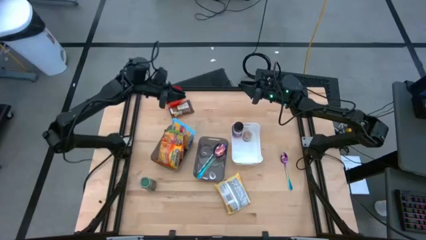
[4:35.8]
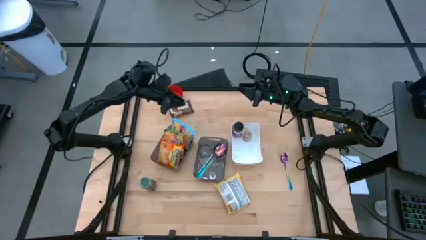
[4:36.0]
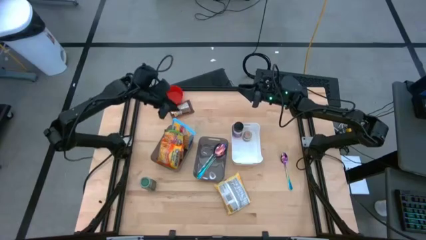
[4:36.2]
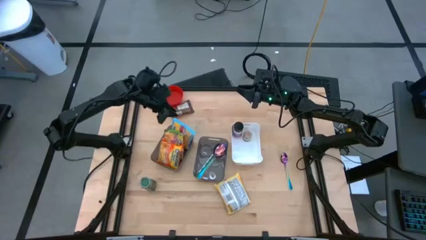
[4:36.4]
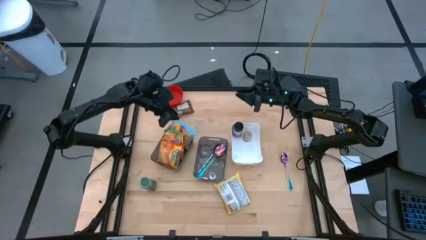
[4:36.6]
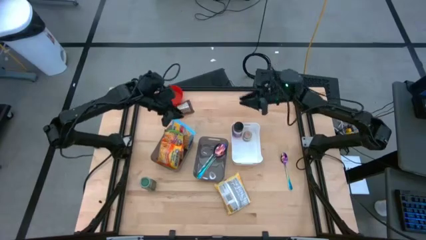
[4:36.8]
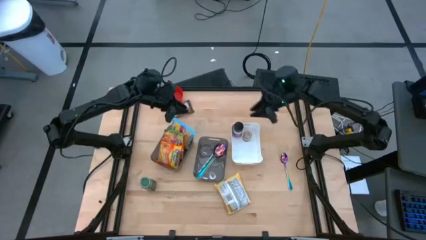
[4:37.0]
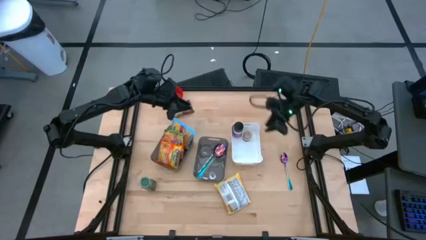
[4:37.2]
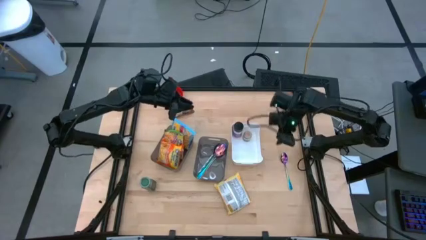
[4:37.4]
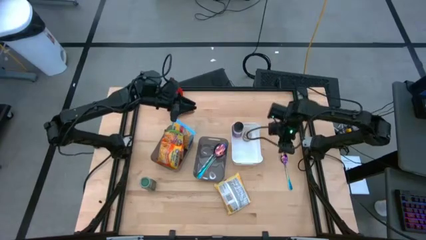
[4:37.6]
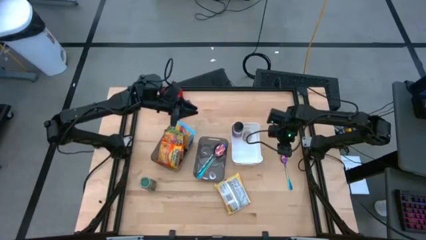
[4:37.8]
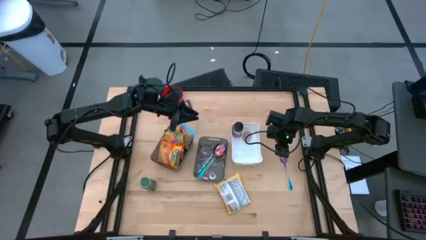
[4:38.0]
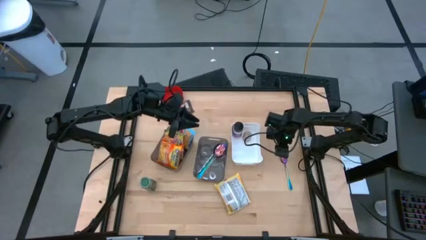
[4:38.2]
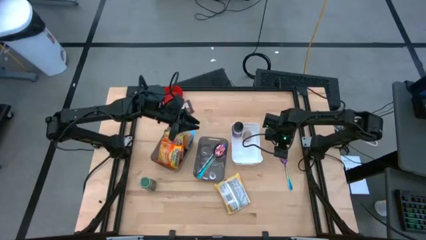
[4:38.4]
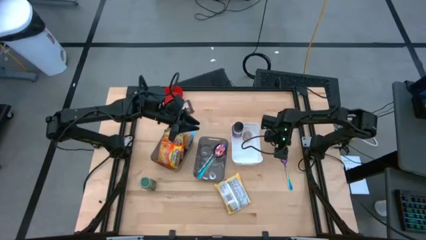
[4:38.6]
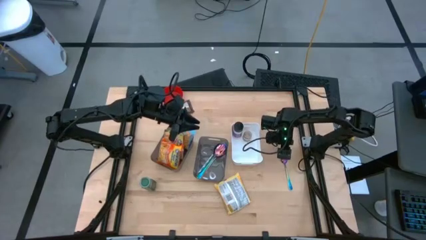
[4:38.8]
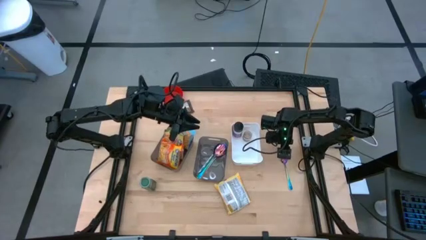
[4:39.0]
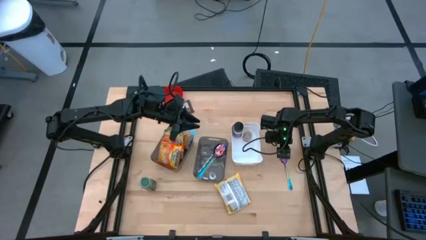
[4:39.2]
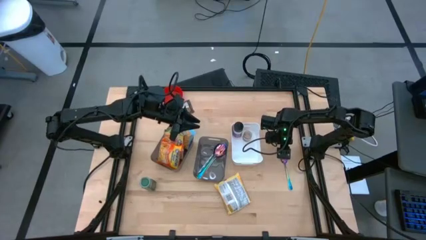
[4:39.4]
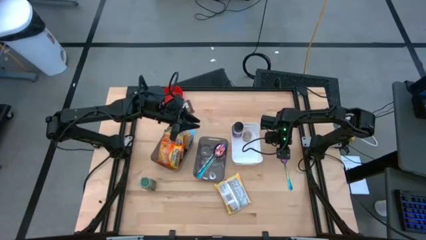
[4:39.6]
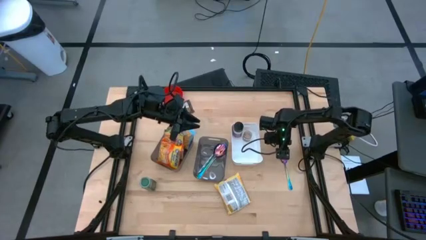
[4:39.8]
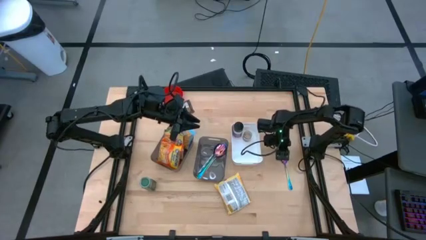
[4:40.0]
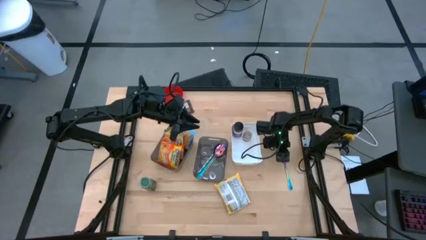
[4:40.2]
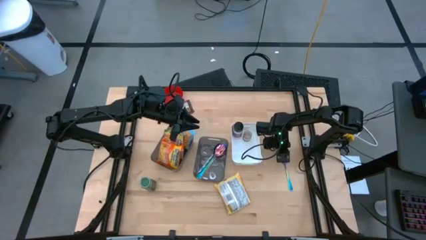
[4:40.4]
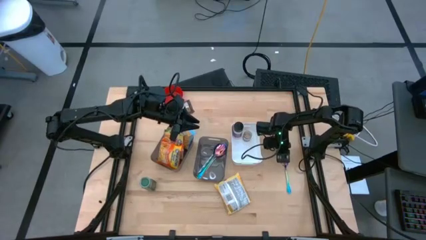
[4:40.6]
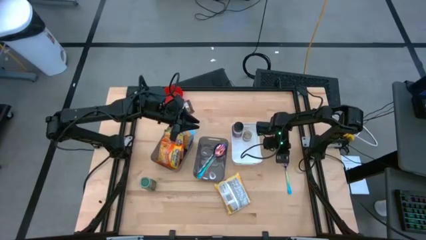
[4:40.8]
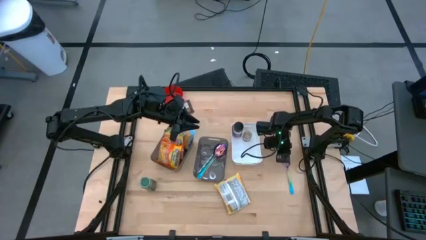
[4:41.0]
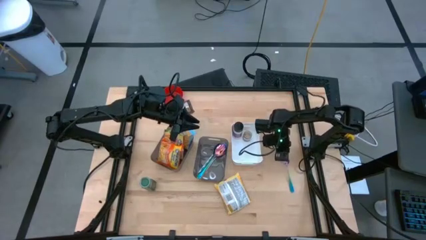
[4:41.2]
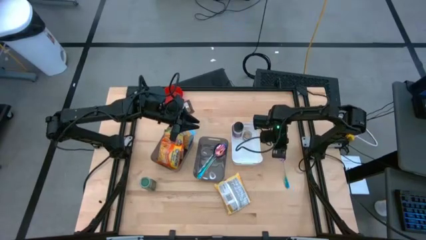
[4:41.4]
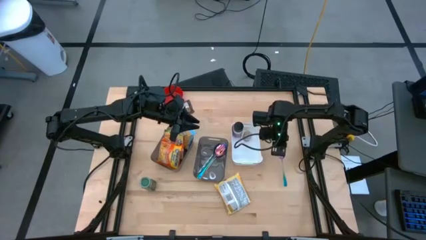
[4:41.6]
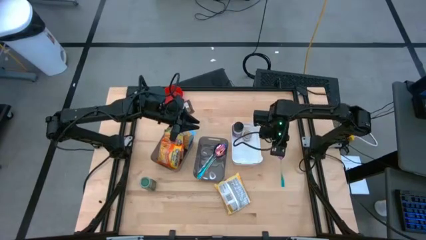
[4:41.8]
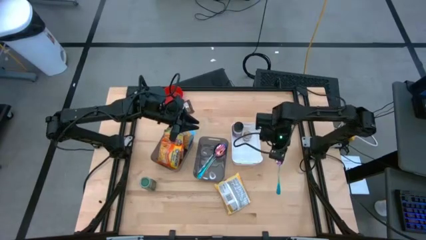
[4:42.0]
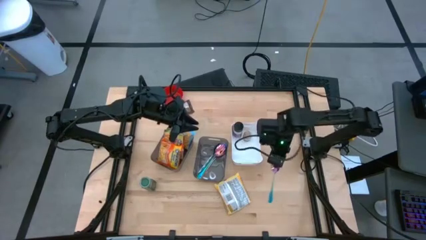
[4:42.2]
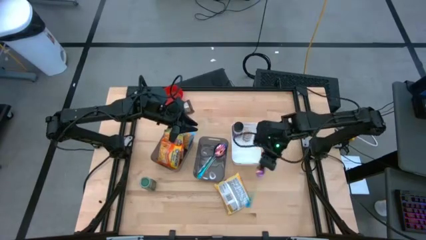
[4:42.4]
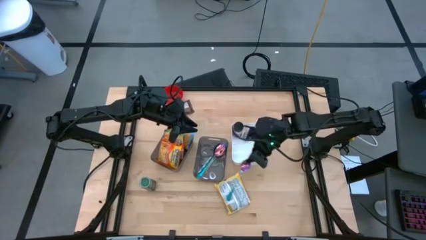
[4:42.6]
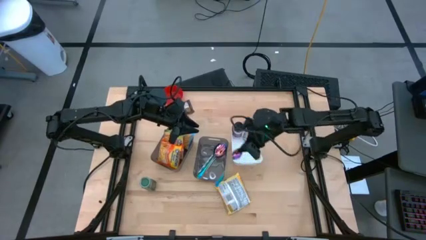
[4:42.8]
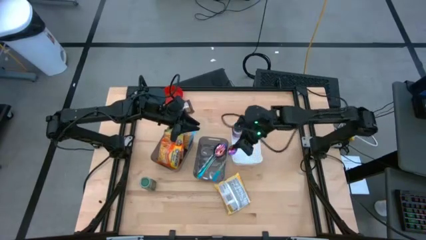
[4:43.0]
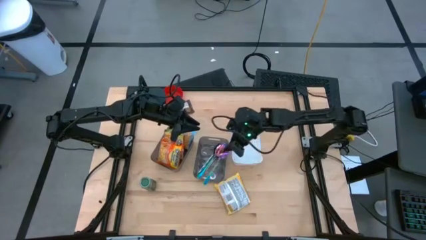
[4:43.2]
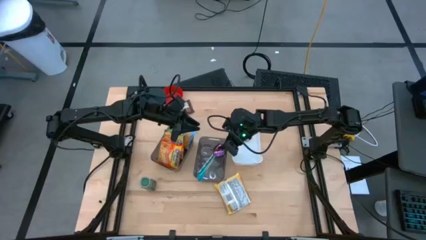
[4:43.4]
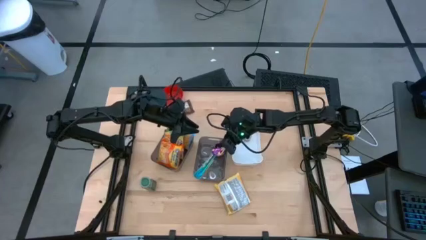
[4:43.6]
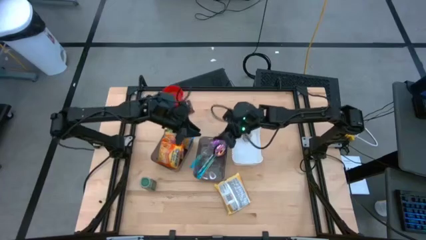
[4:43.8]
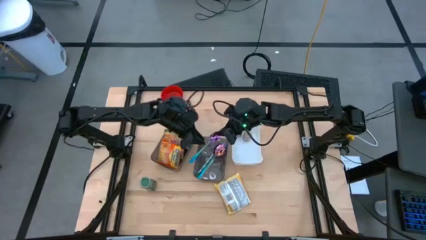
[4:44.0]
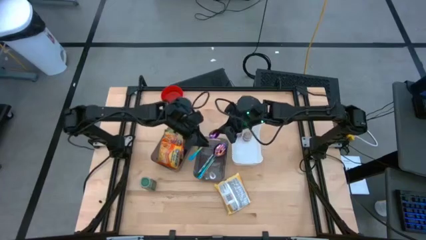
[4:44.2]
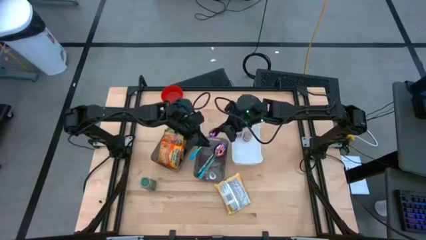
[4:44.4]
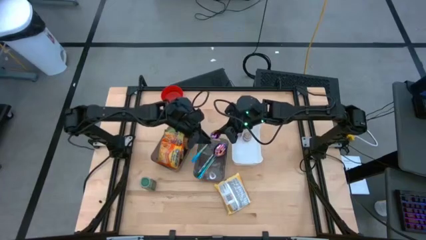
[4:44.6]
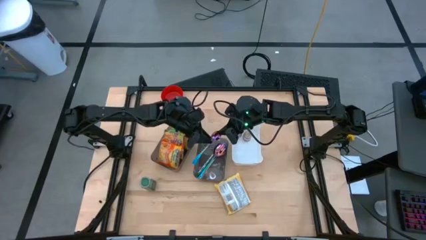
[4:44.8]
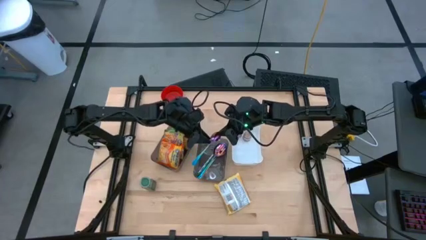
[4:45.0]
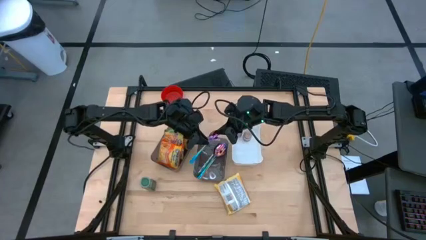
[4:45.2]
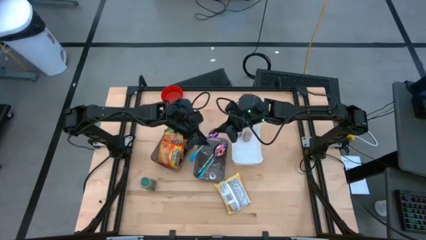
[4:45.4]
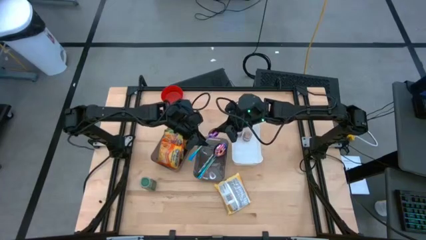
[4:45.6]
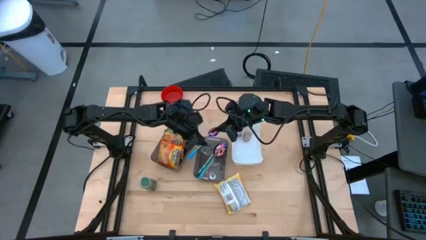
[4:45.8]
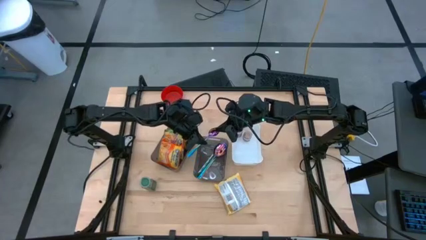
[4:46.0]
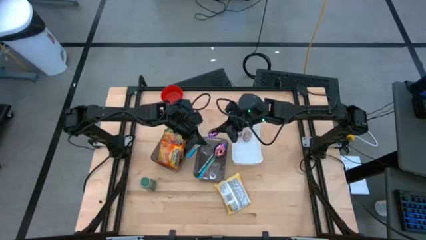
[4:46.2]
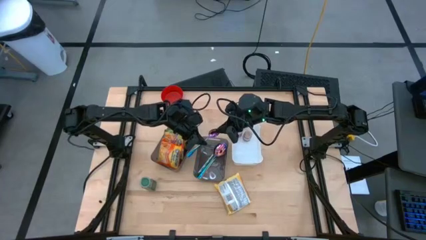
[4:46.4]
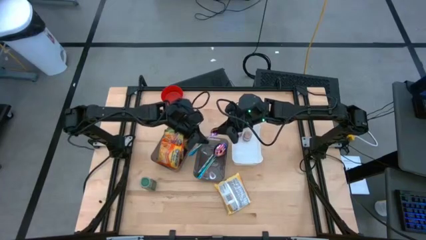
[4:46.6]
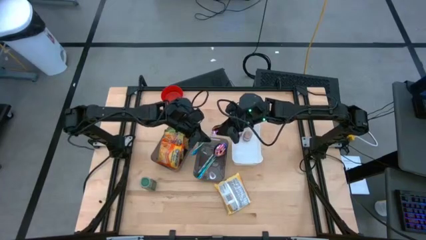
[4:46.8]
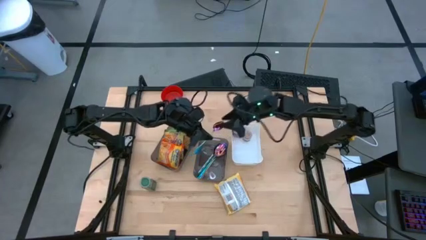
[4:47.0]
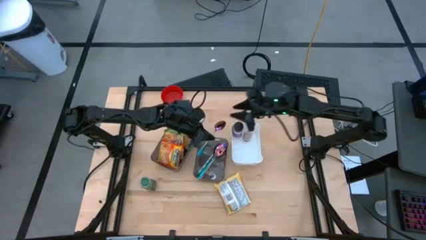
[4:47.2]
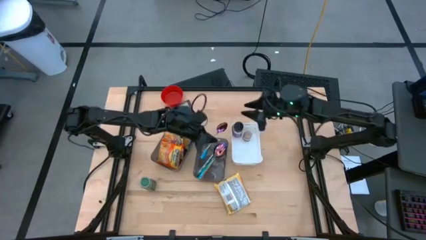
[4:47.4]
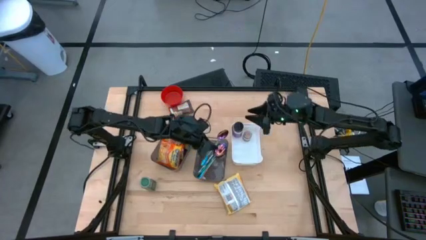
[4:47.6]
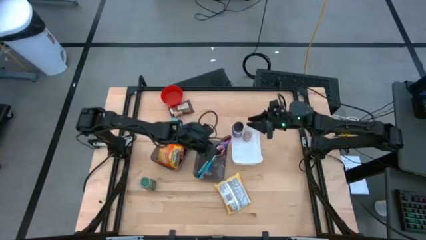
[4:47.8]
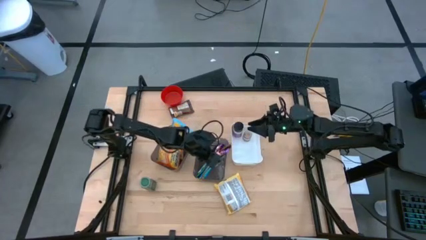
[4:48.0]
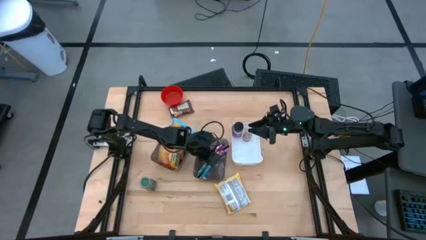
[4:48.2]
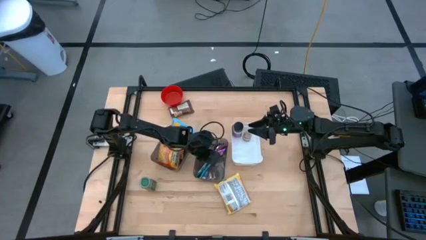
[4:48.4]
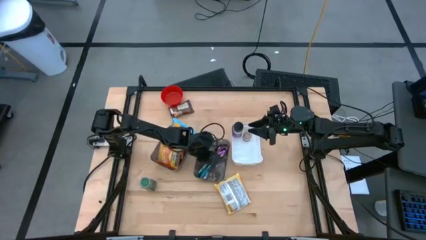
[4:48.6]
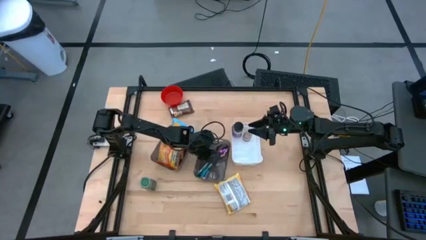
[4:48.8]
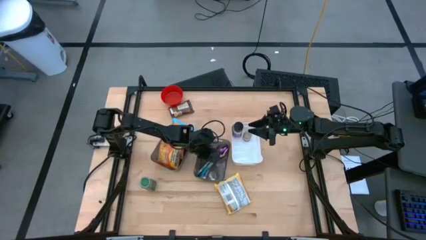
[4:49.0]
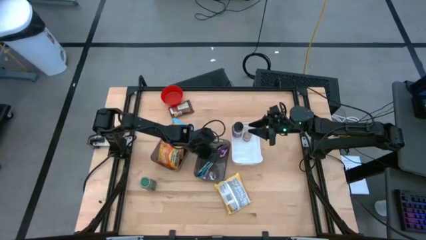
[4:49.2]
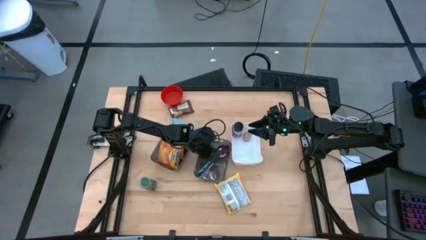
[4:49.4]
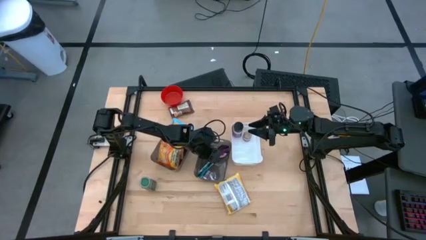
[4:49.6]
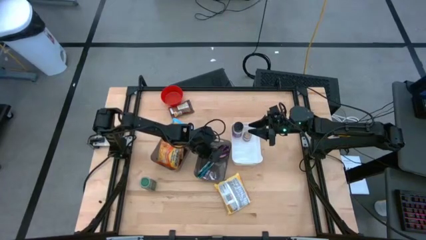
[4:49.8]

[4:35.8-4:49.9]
Task: Pick & Place Food Item
Put the blue spoon into the right gray bin

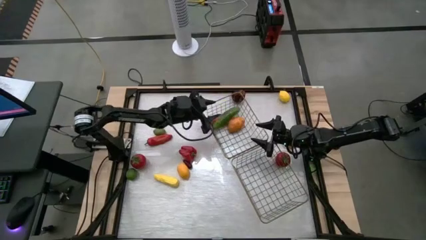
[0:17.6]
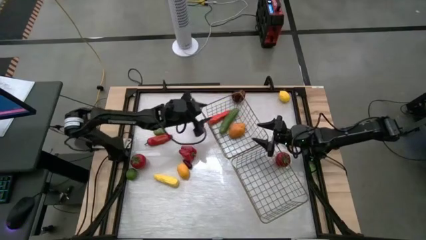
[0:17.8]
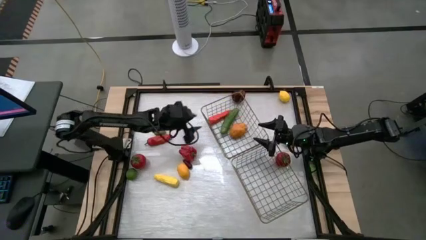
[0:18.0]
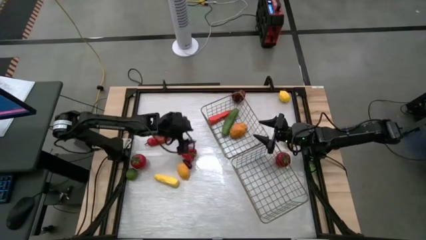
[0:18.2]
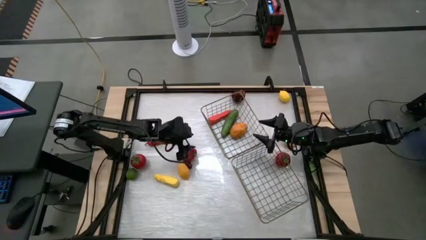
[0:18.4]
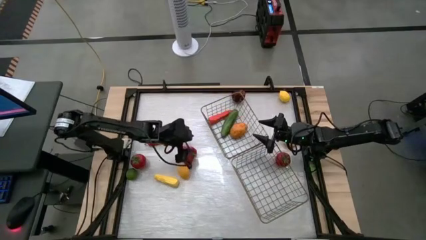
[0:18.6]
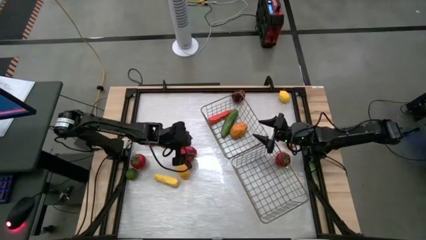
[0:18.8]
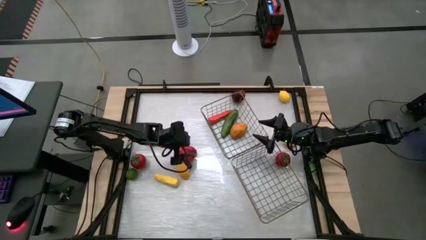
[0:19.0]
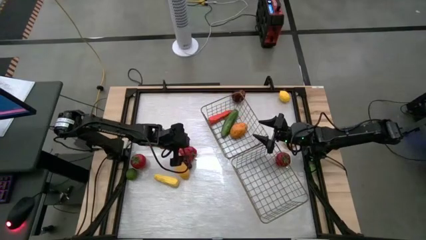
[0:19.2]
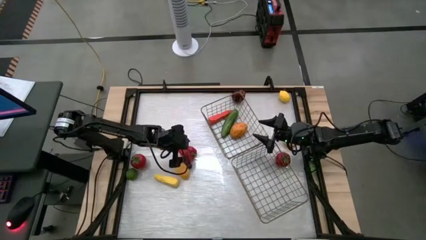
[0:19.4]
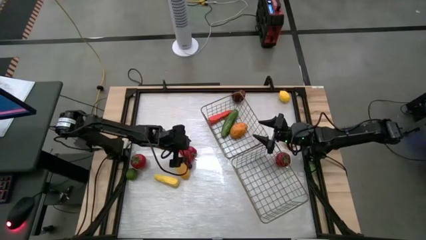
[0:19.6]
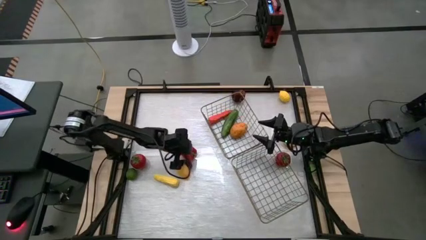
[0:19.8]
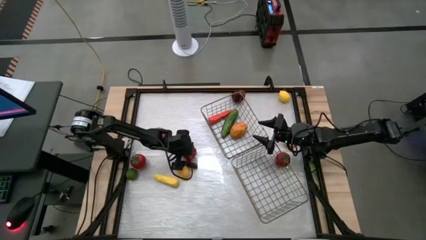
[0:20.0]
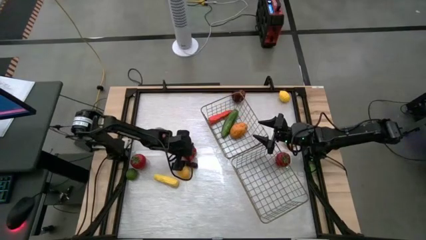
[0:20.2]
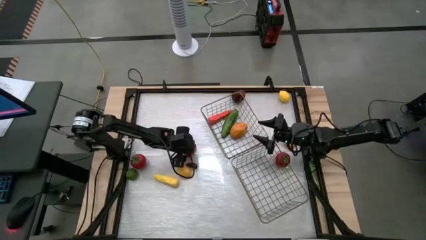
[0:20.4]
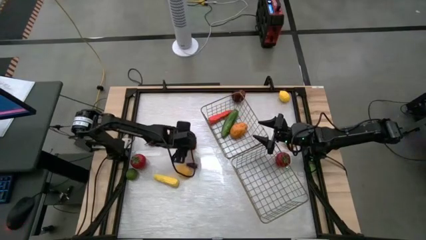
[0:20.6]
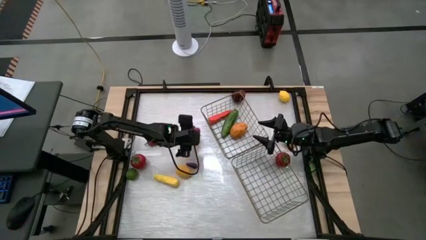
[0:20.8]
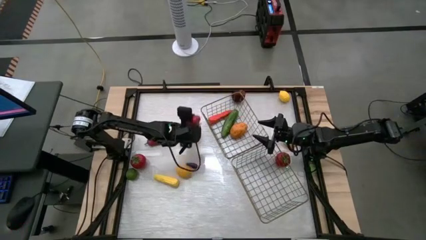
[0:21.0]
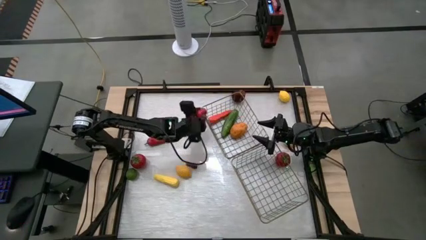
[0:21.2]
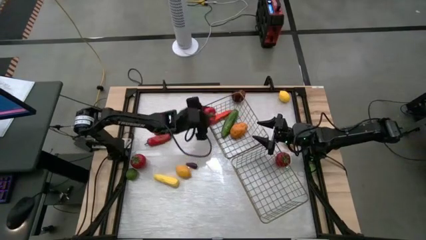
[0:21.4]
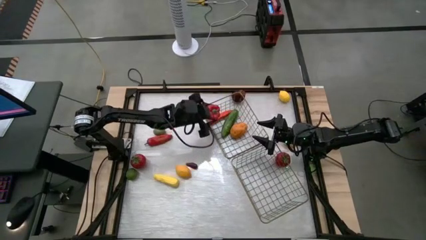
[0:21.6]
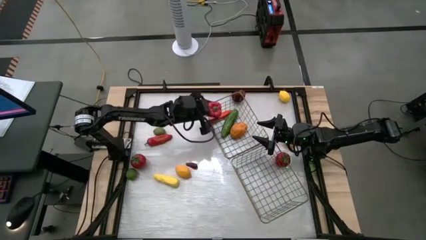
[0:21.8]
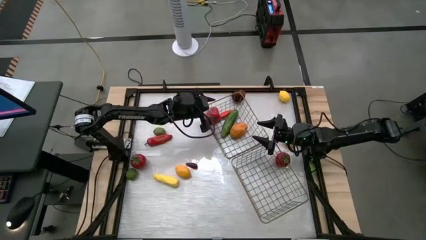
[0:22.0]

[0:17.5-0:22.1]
Task: Sort produce into baskets
Put the bell pepper into the left wire basket
